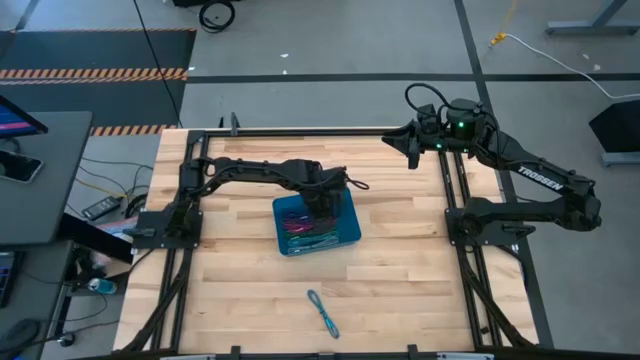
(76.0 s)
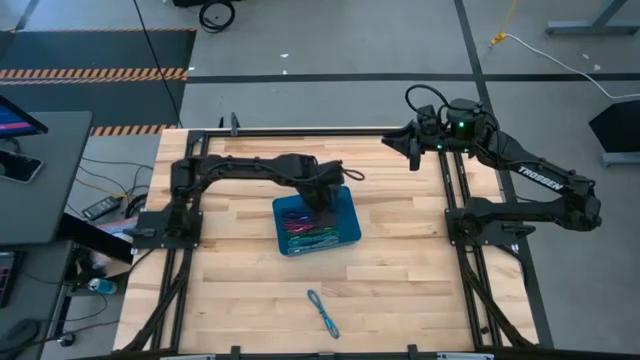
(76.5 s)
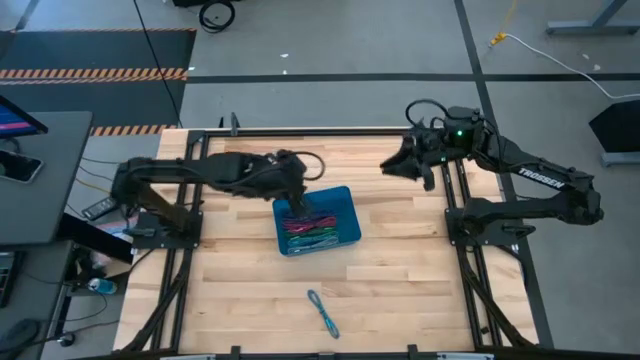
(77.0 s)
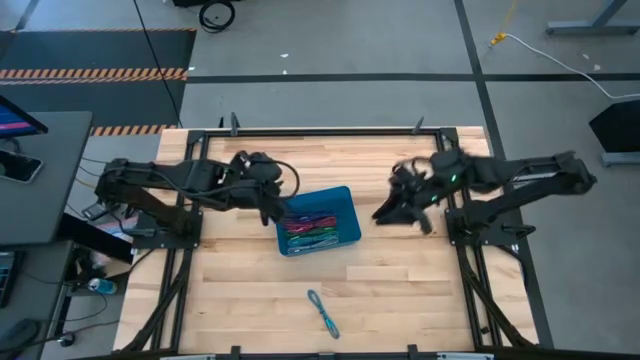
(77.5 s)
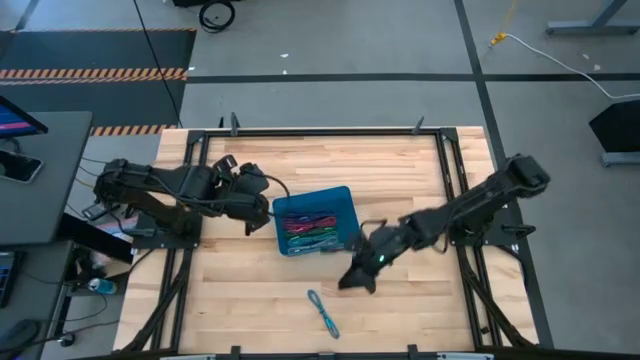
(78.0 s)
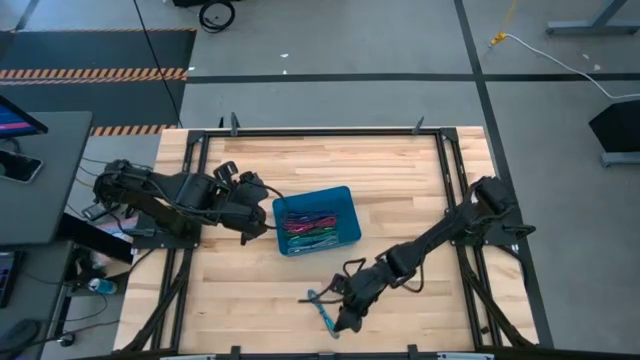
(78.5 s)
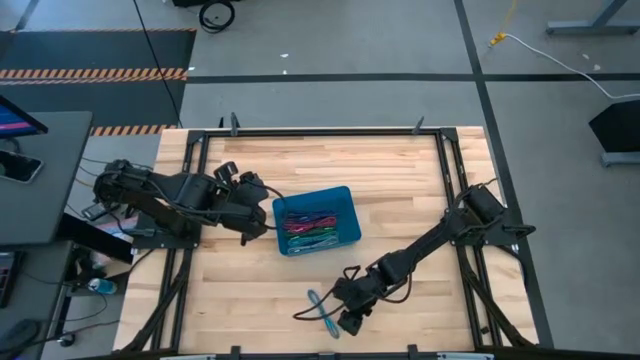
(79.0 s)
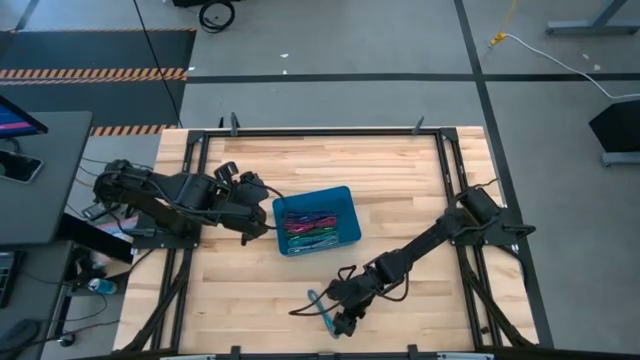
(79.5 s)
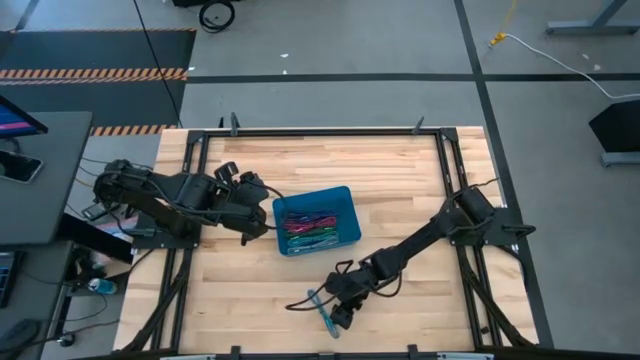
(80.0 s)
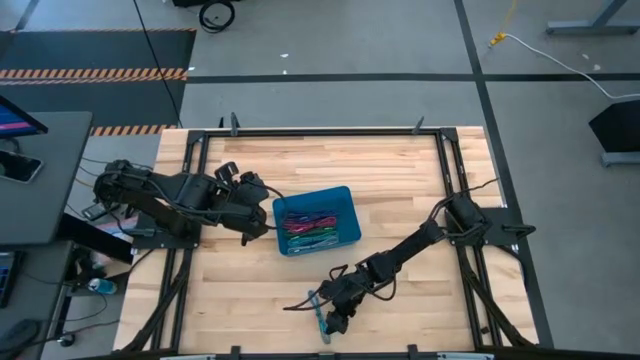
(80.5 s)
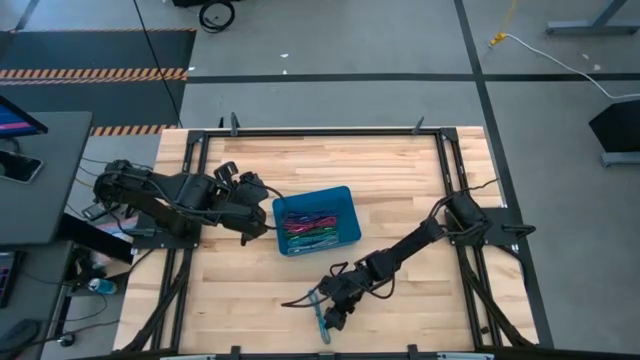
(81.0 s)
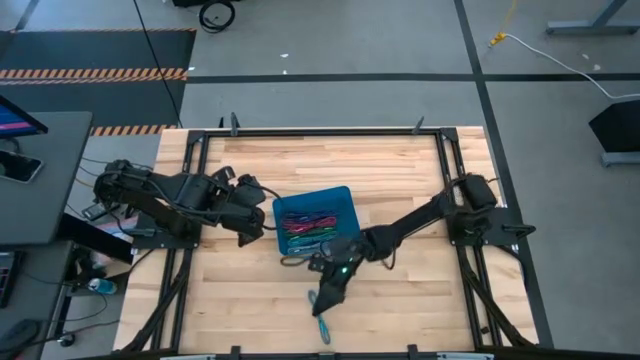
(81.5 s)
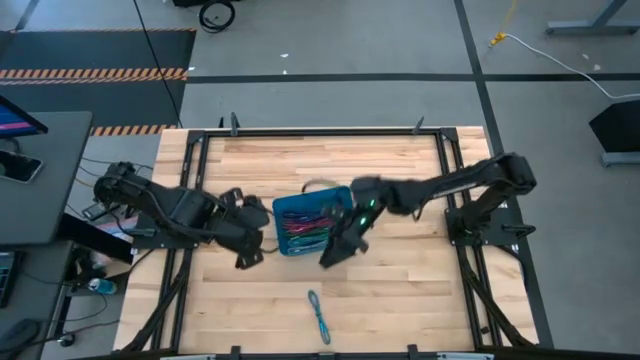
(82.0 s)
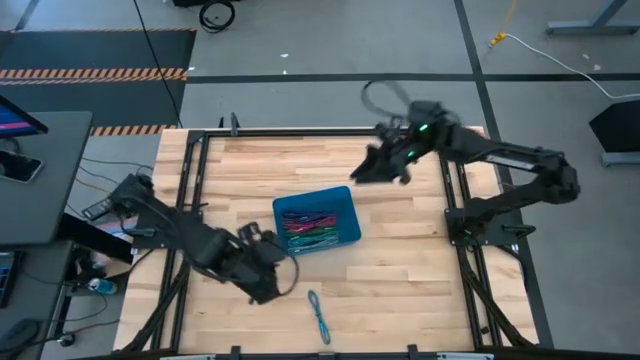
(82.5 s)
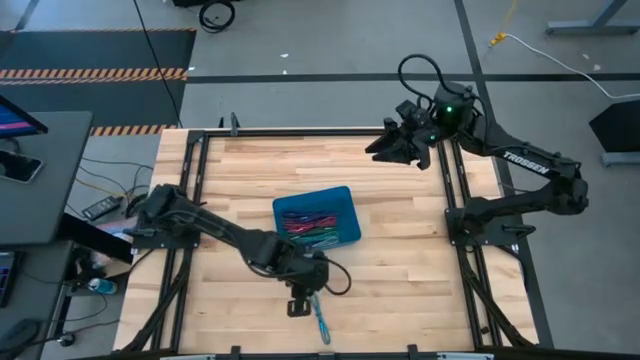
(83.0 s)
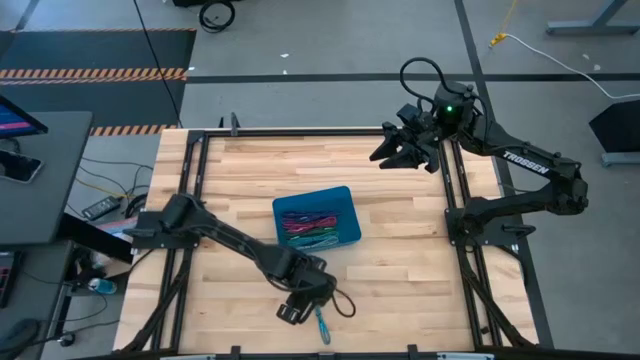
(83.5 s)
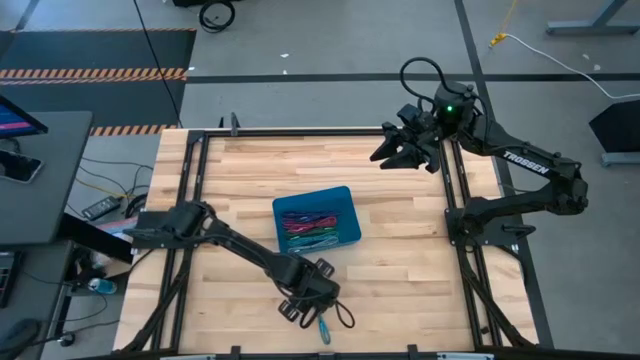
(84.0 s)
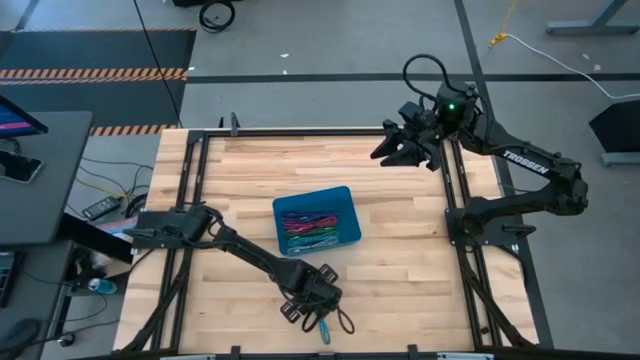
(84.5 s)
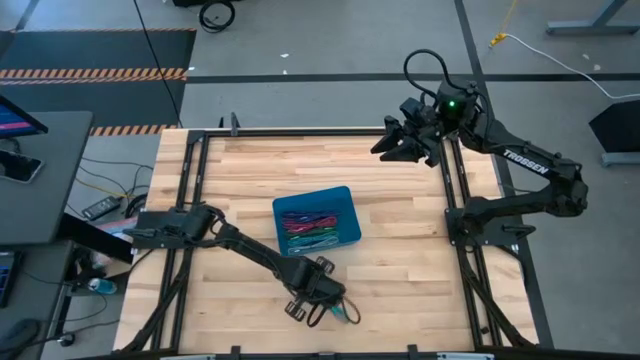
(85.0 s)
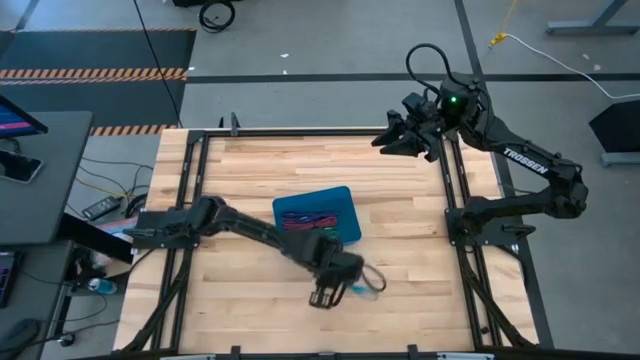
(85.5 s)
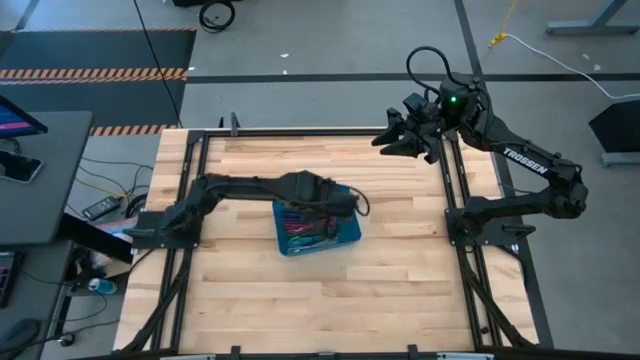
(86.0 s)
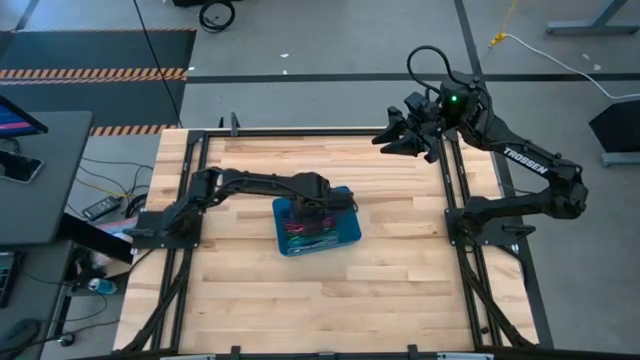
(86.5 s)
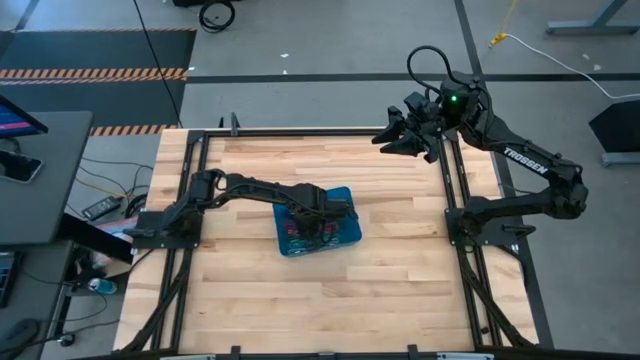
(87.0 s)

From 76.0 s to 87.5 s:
Task: Pick and place USB-C Cables
Put the blue charger cable into the blue bin

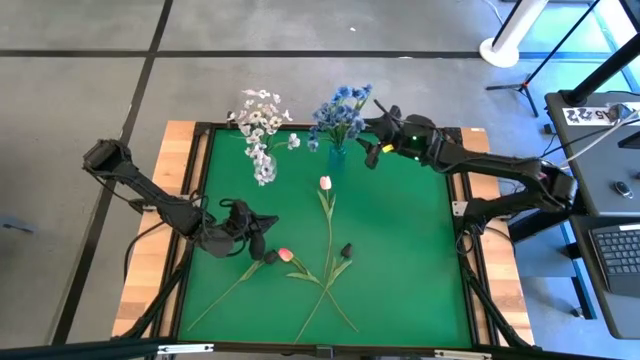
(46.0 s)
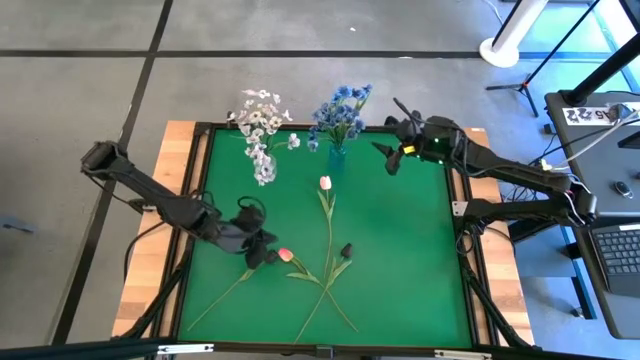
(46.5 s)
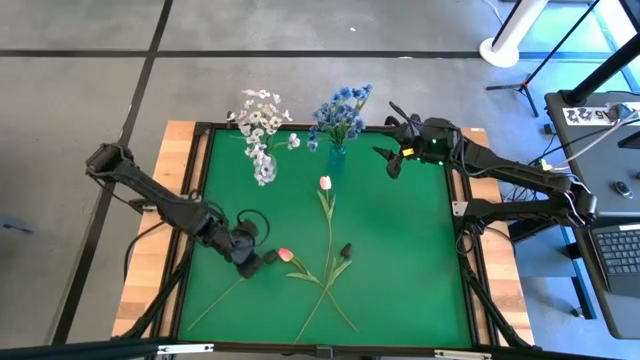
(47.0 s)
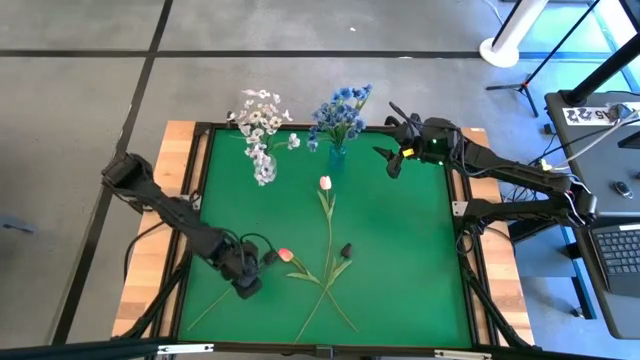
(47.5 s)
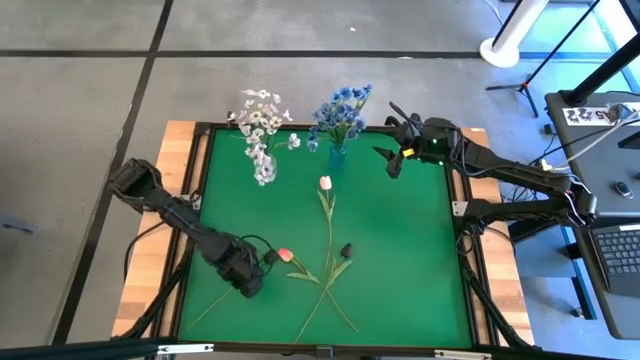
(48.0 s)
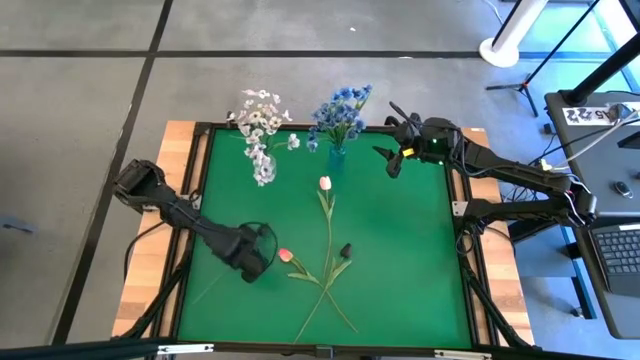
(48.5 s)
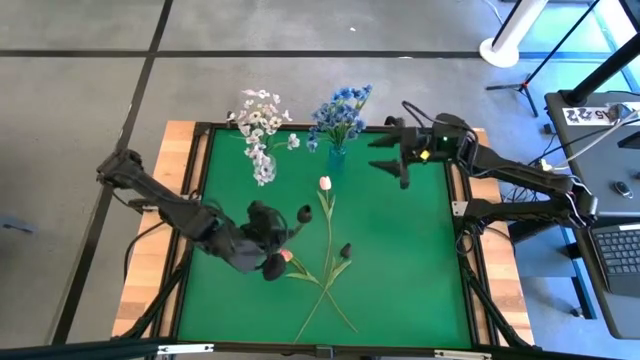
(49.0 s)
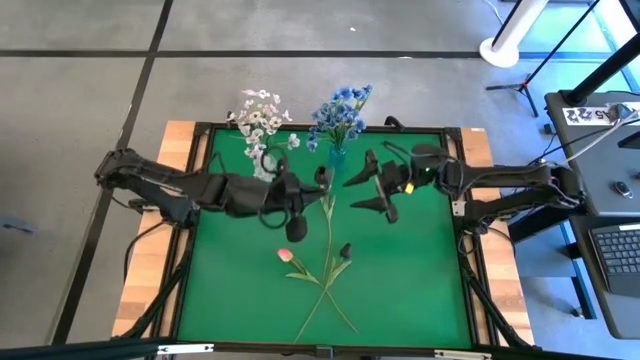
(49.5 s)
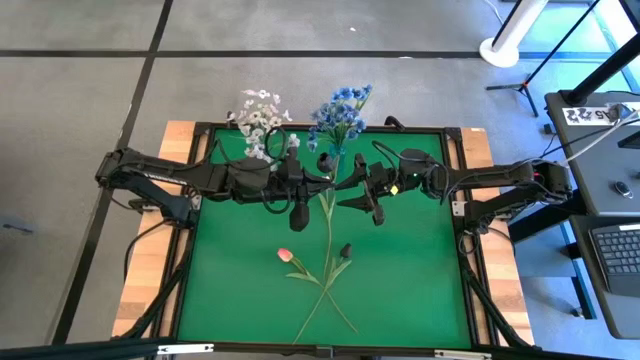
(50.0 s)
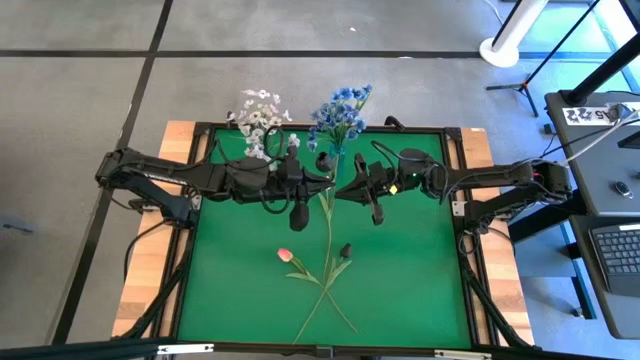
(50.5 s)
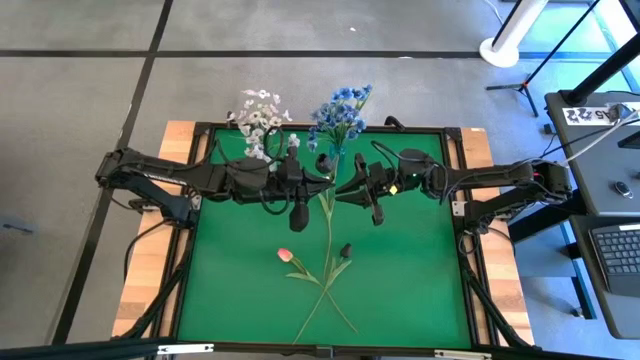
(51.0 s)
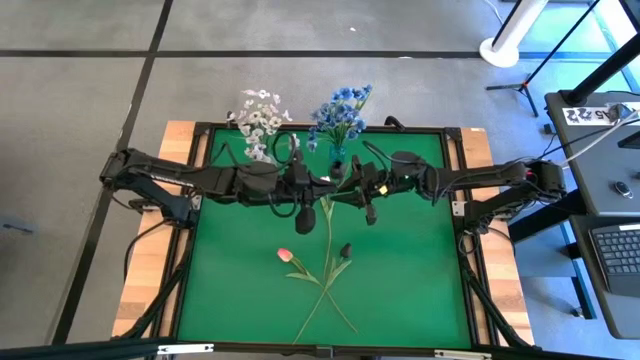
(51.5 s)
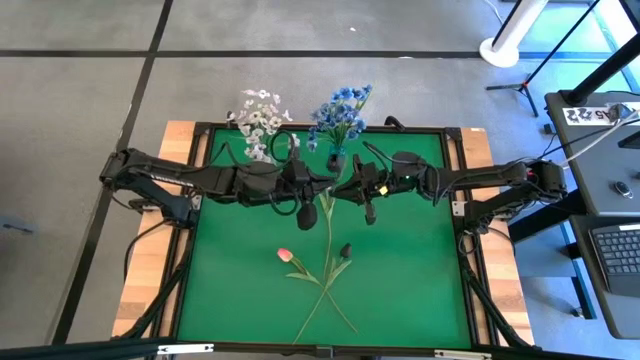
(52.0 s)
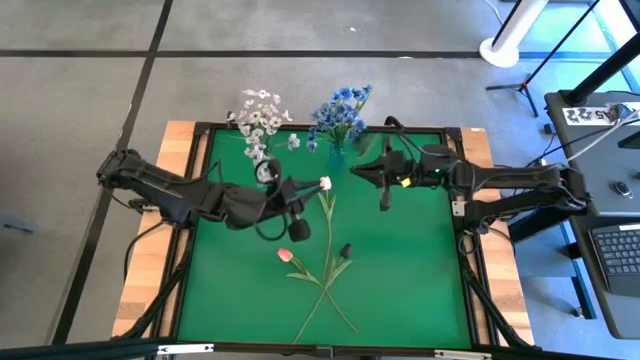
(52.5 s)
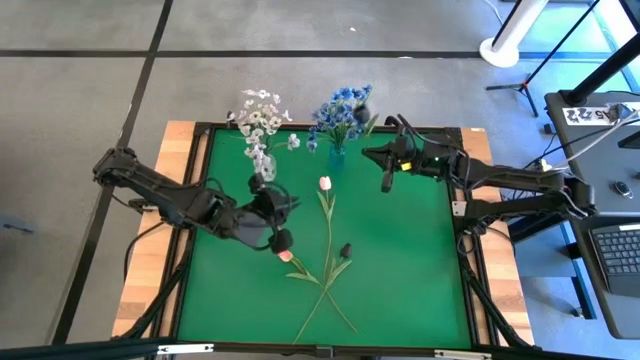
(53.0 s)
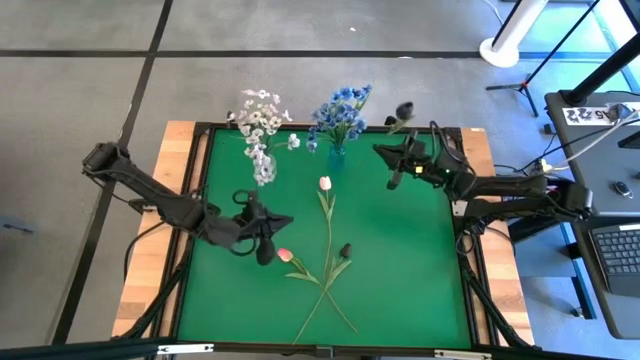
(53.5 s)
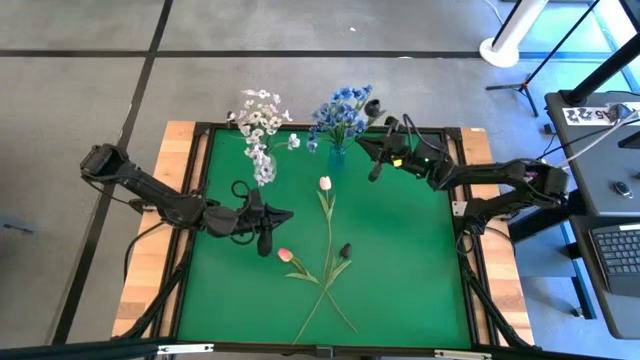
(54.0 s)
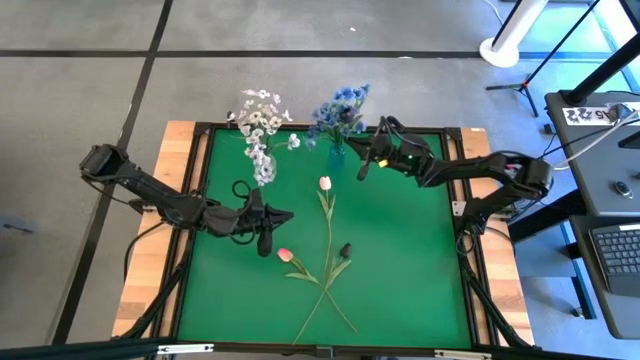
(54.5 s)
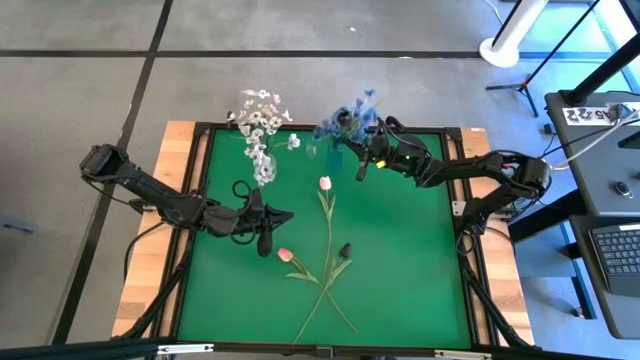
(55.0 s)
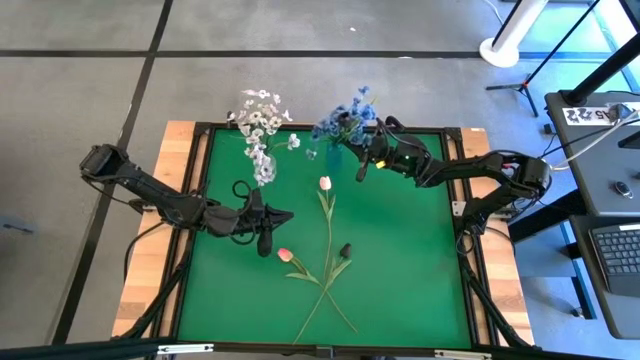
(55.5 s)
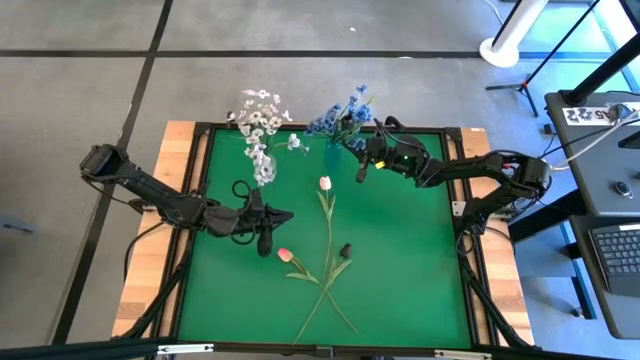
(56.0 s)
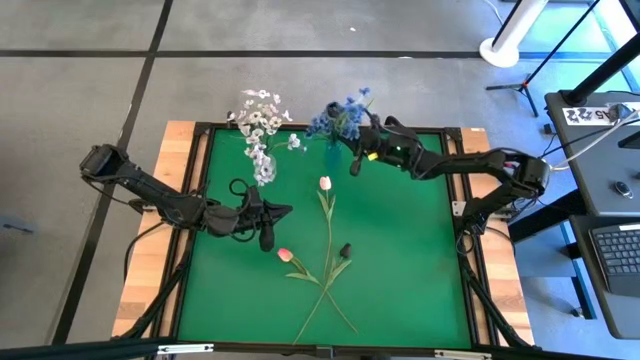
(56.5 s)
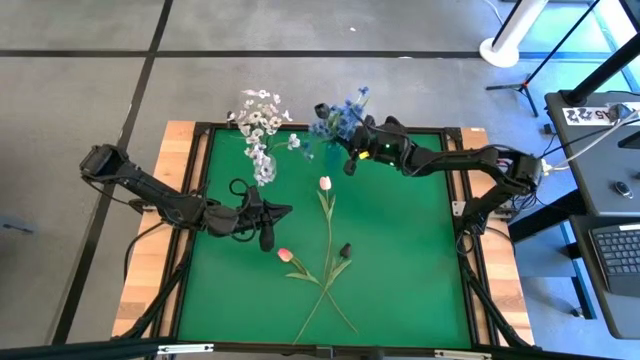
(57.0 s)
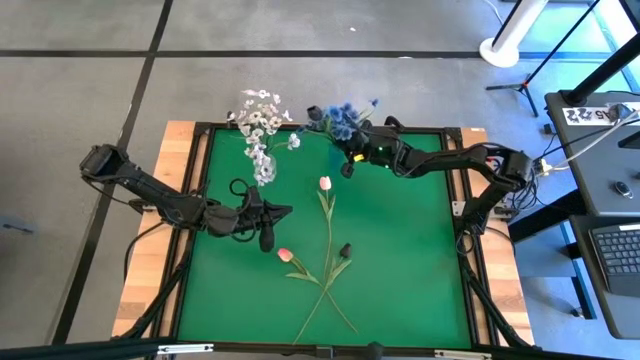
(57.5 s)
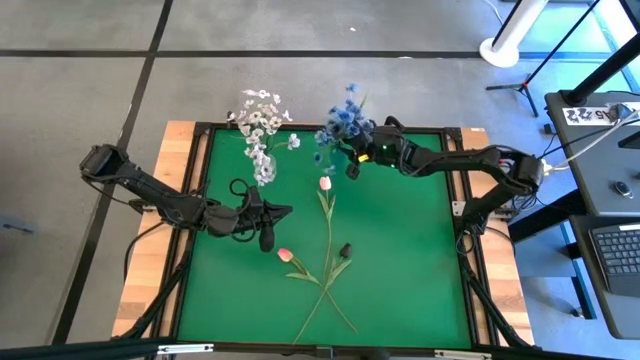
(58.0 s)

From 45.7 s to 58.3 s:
Task: Sort flowers into vase by color
Put the left black flower into the blue vase
